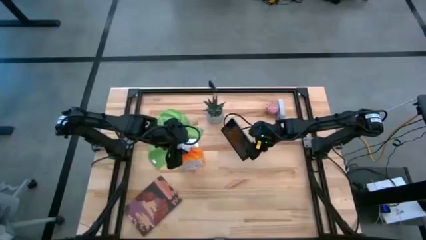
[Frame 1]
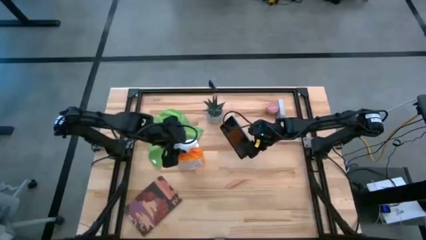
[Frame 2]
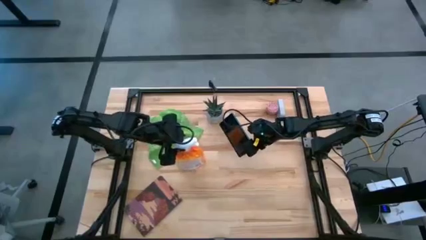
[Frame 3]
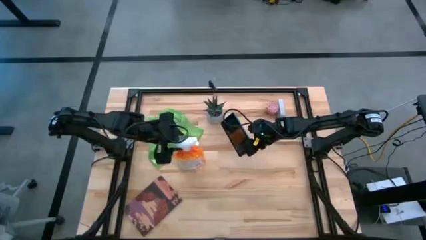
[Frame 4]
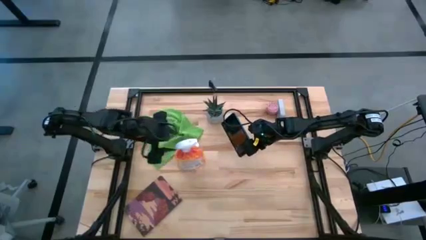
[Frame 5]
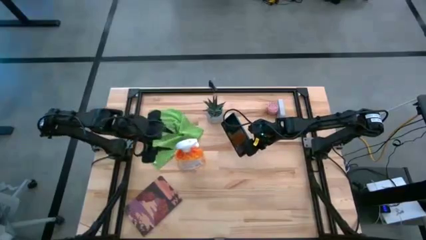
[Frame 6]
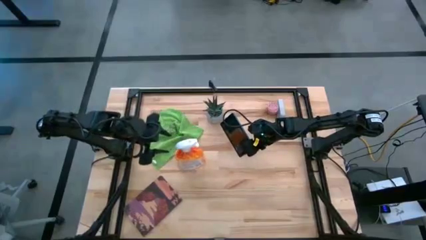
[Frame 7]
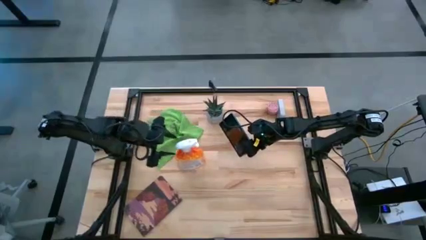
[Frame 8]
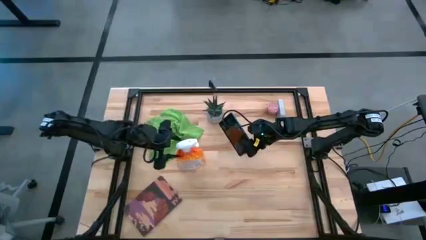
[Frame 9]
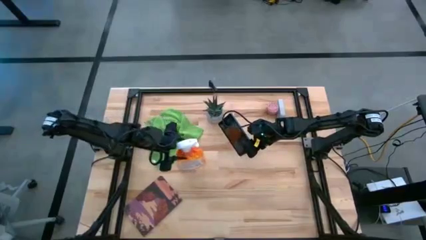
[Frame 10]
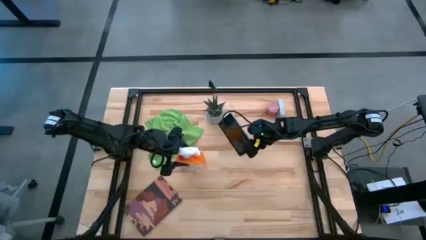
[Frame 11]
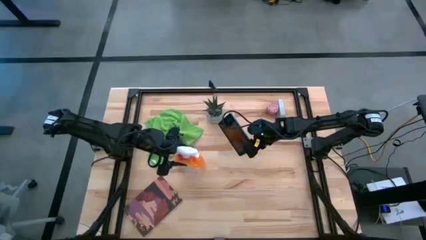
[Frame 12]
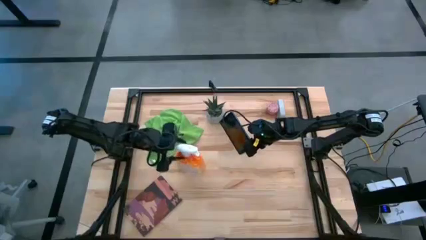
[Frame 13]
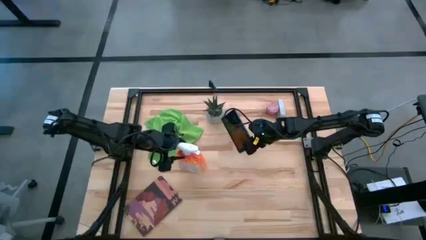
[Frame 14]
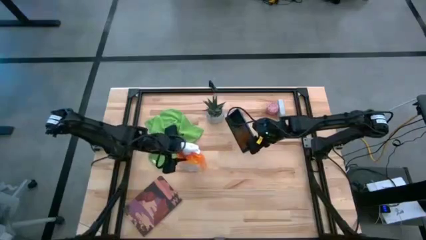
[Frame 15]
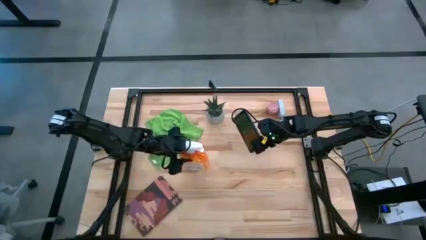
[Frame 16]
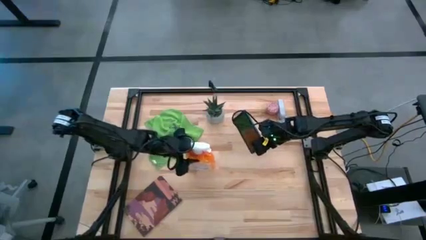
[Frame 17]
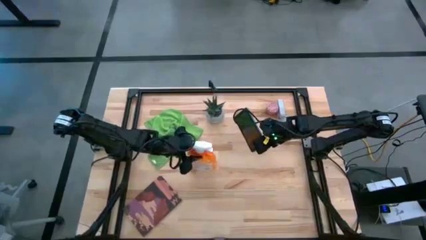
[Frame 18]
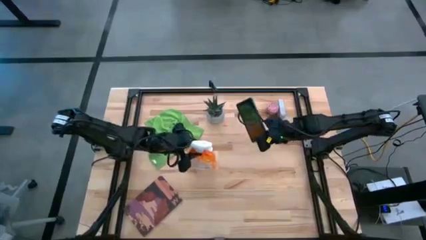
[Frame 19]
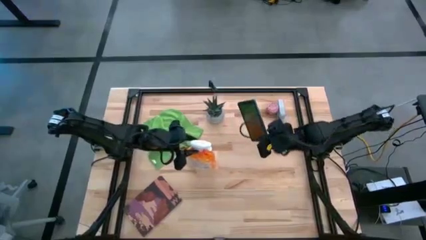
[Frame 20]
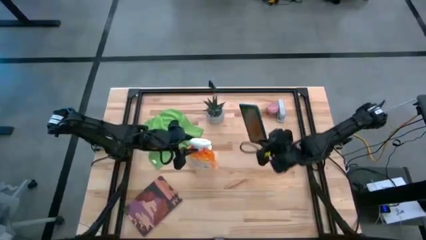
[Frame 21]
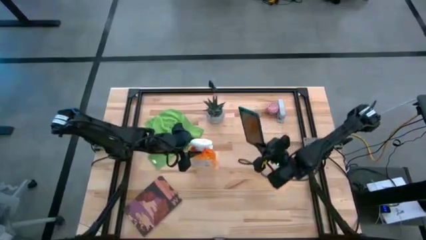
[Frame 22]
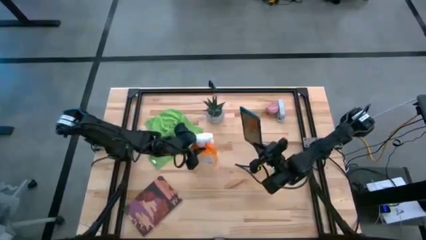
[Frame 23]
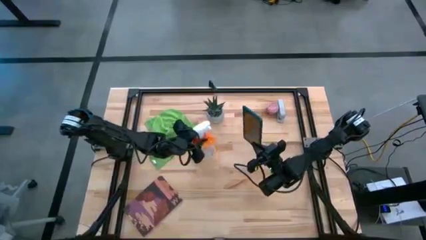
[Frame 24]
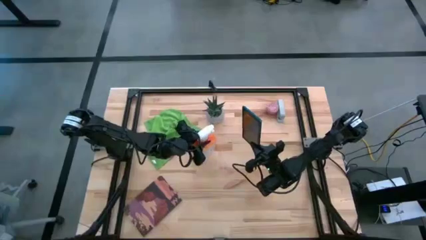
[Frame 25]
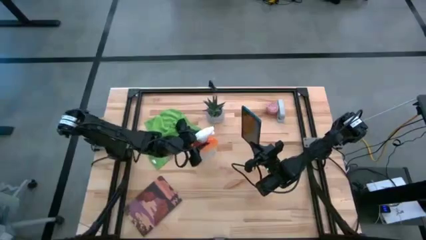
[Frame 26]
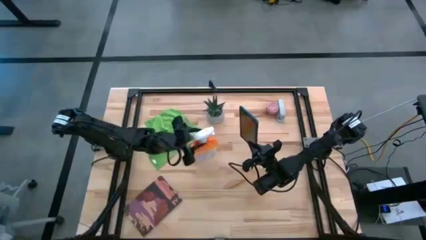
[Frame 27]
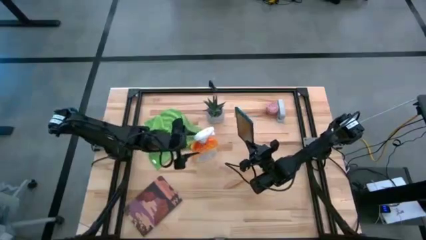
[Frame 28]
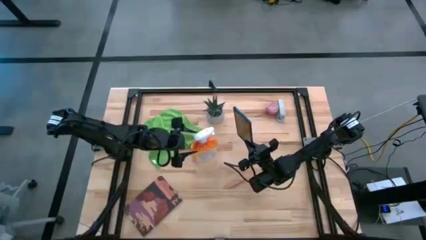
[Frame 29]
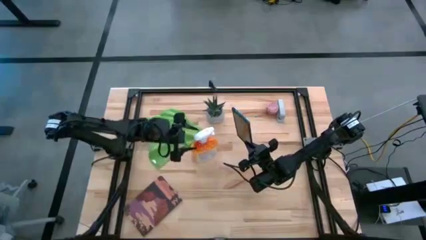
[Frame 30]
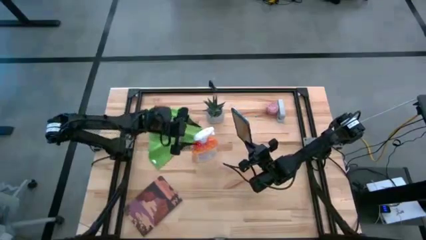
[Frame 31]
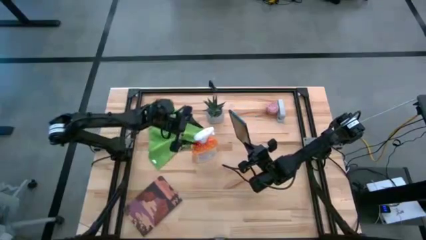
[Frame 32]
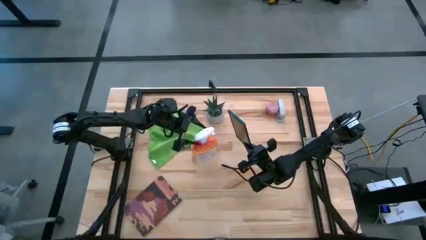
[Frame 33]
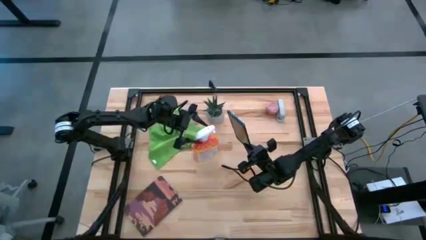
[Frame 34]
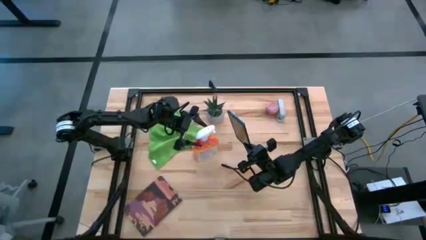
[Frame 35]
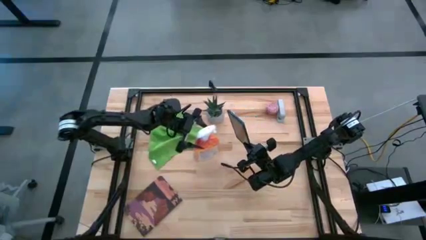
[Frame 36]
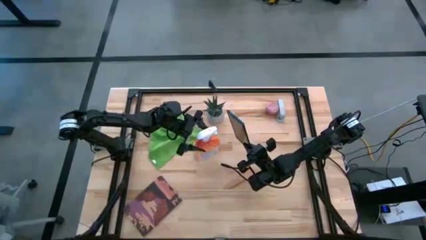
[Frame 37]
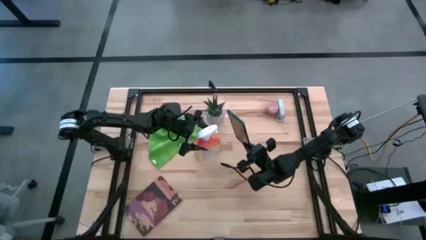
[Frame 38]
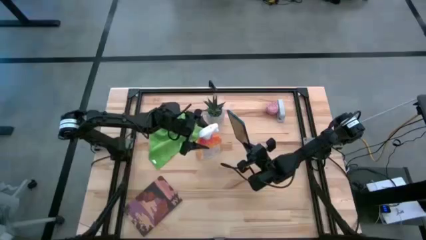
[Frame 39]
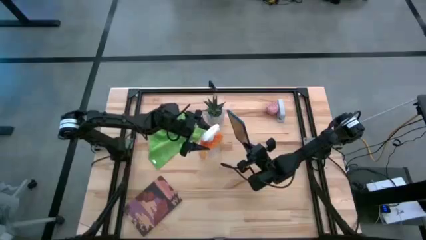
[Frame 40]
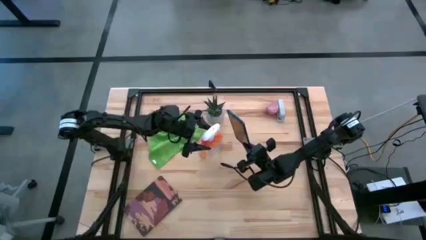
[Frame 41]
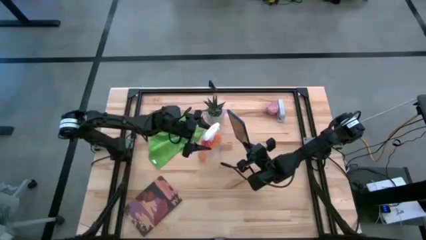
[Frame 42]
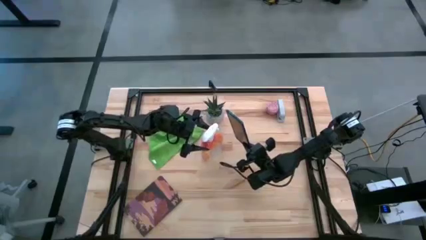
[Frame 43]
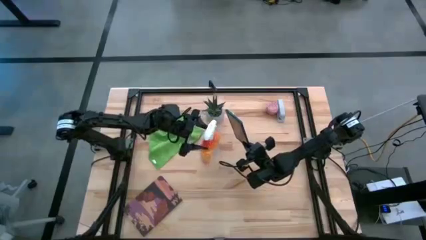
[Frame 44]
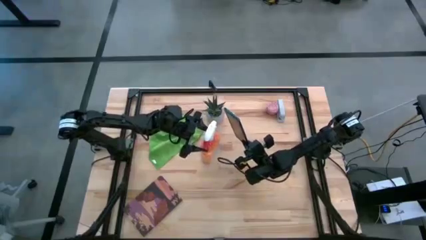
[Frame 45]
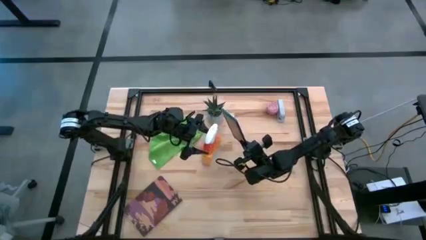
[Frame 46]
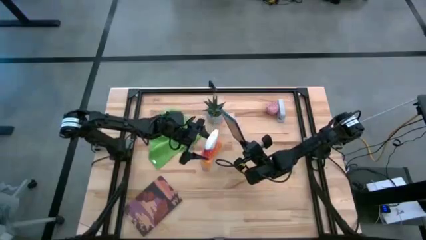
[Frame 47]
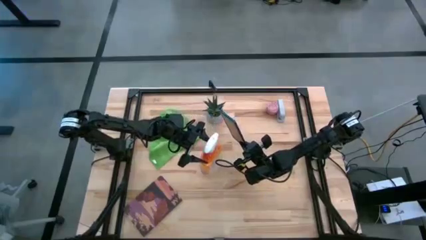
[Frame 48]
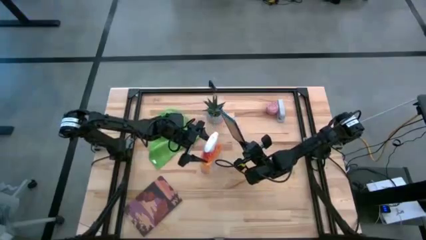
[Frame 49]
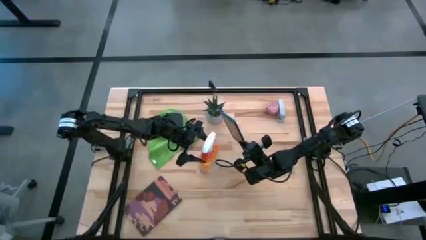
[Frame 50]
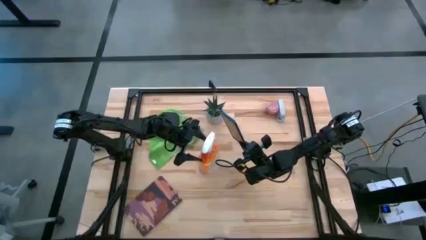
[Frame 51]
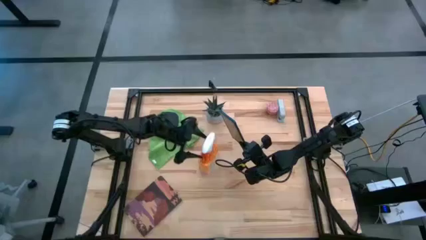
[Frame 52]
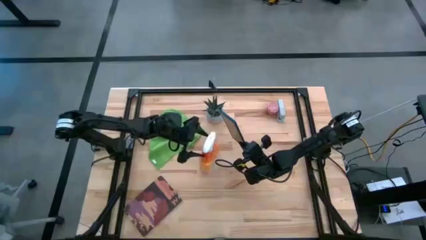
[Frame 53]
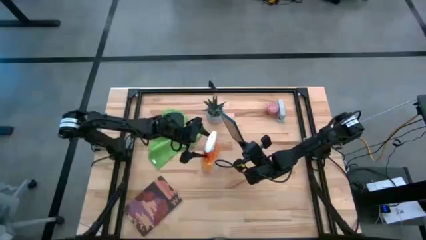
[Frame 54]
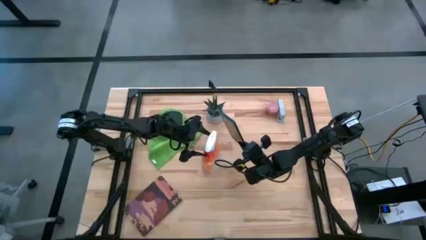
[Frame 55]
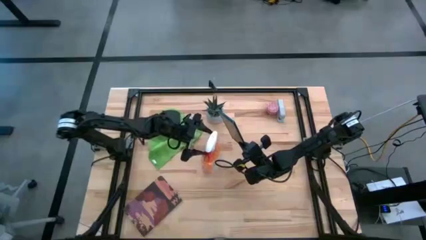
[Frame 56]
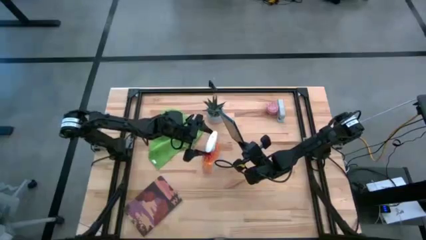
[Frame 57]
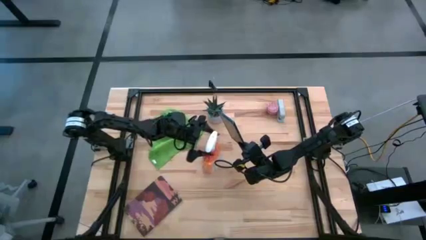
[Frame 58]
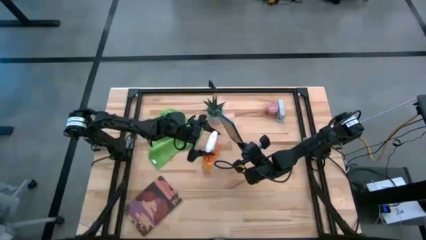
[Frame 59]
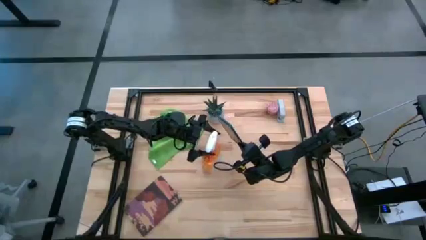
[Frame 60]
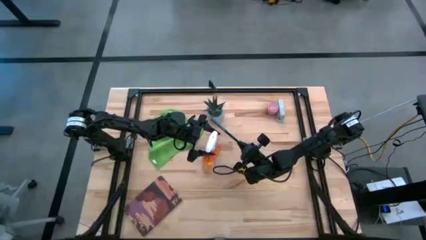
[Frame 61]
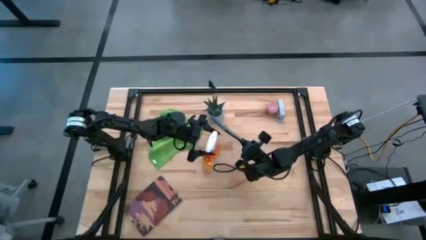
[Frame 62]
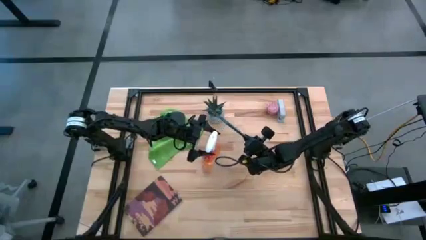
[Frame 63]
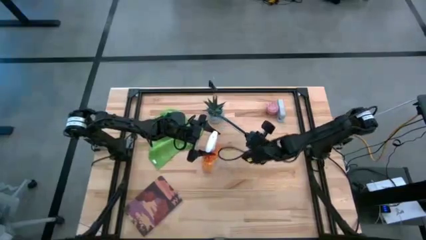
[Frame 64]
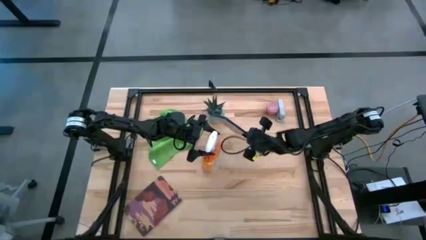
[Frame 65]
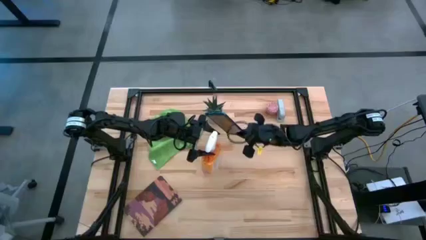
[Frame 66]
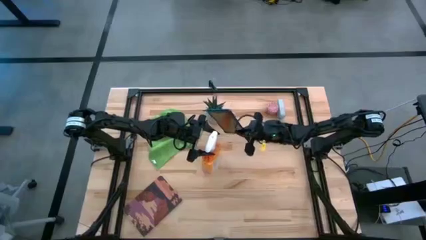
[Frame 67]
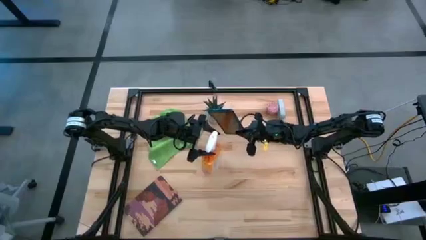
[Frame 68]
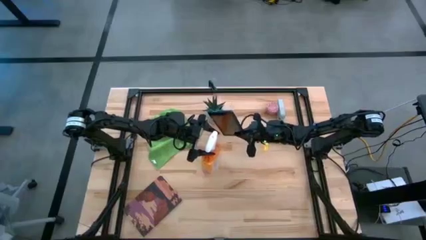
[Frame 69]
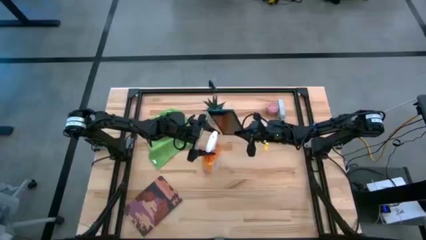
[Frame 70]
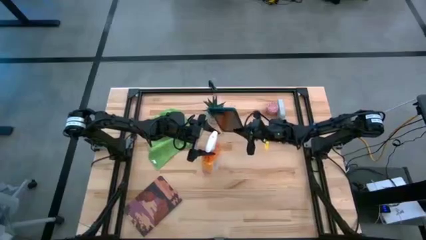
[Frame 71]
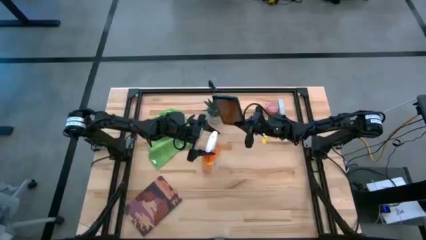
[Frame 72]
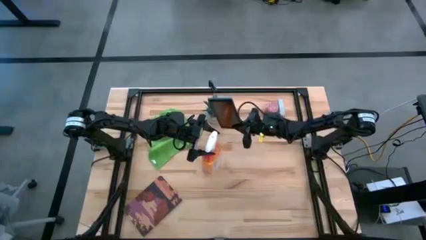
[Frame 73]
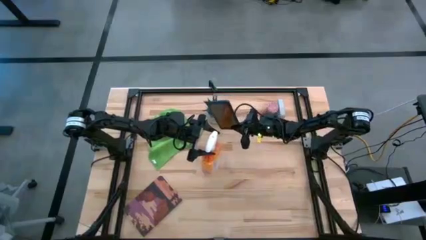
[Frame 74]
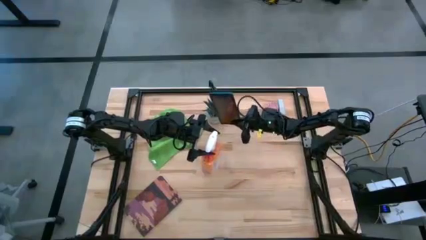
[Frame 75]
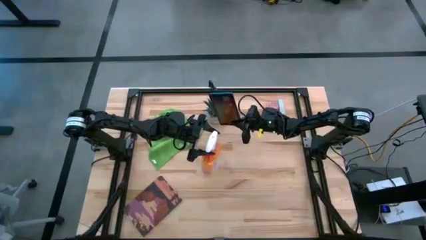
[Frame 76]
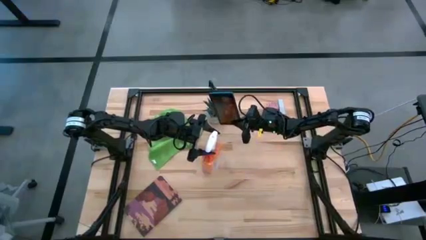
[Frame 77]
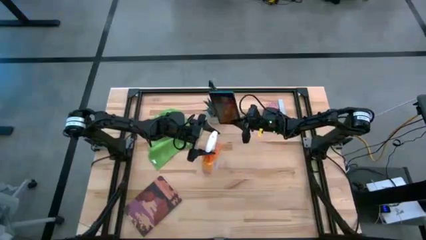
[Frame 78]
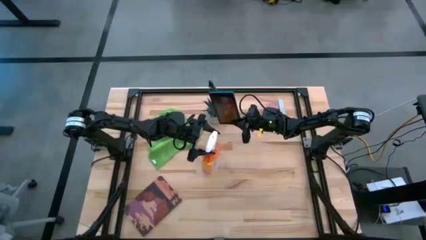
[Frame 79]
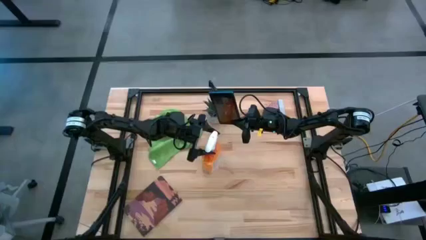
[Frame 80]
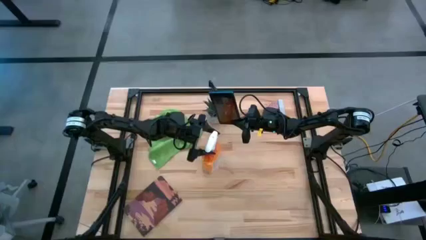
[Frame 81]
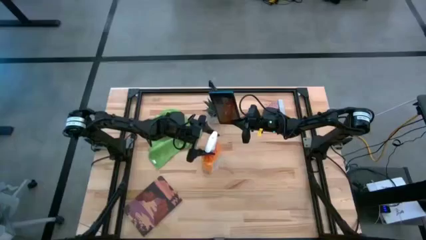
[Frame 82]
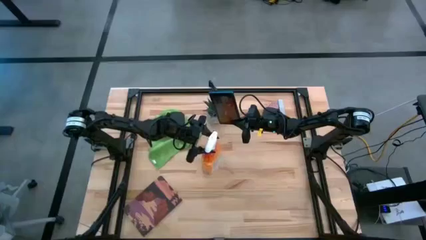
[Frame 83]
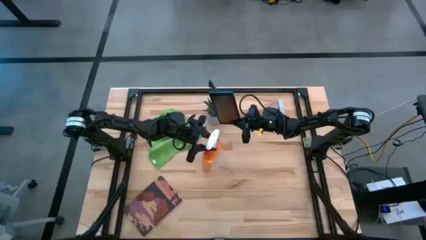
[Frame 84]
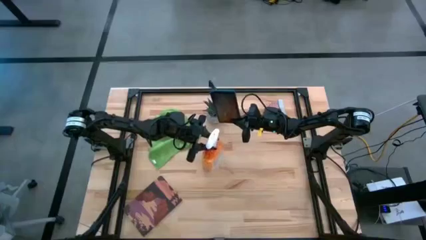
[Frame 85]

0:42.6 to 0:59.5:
Task: Apply microfiber cloth
Spray the front and back of the tablet with the spray bottle
